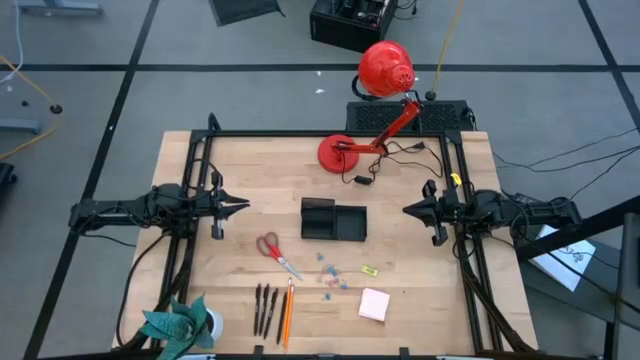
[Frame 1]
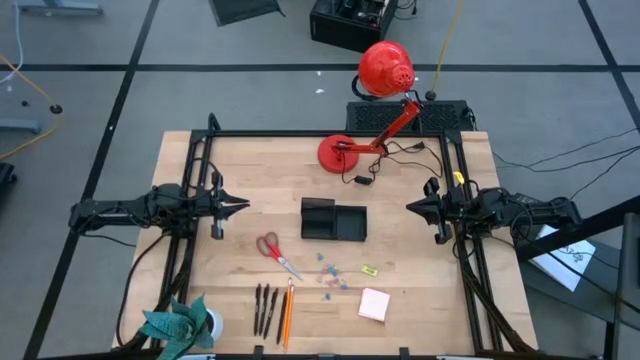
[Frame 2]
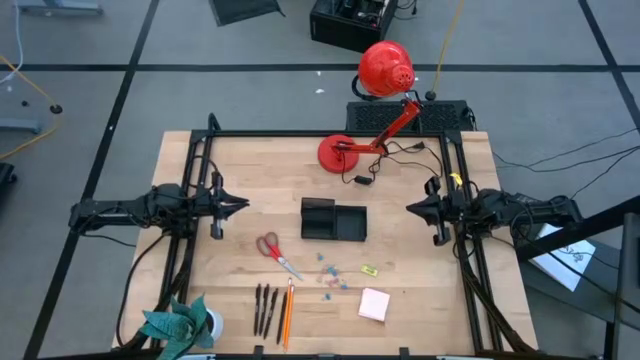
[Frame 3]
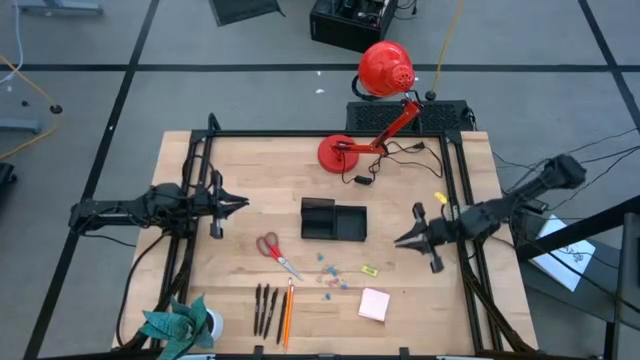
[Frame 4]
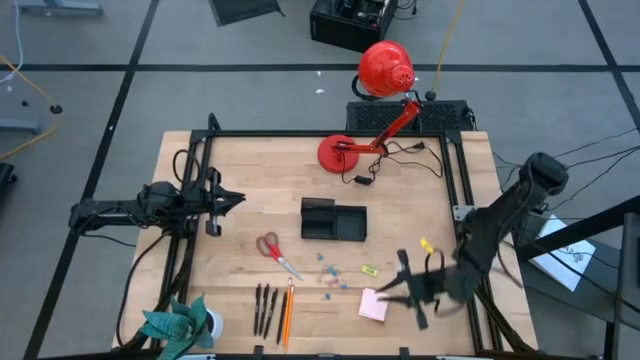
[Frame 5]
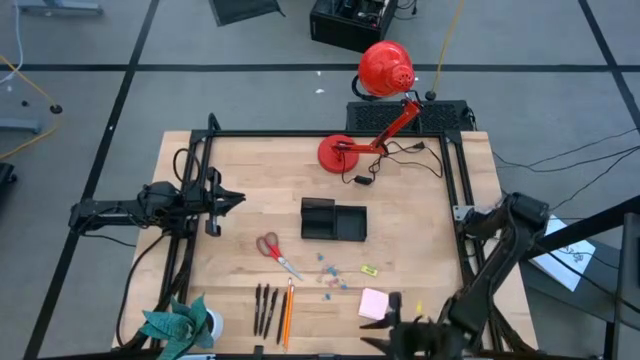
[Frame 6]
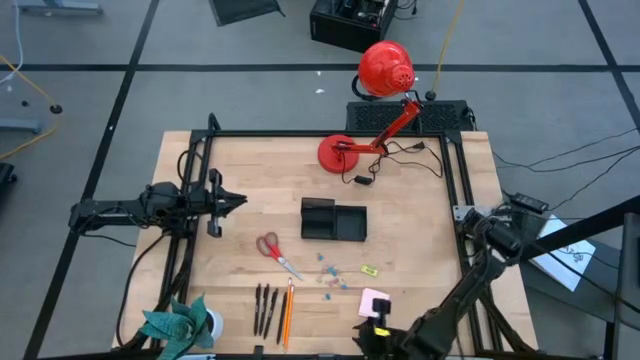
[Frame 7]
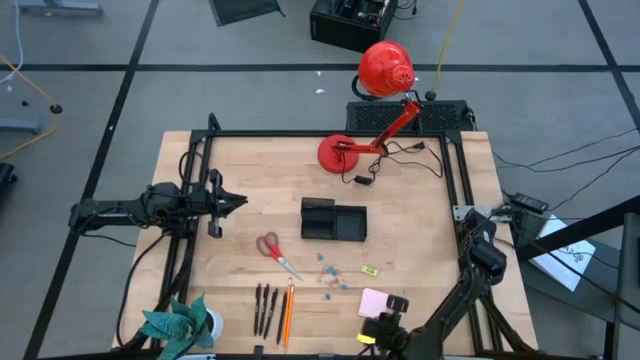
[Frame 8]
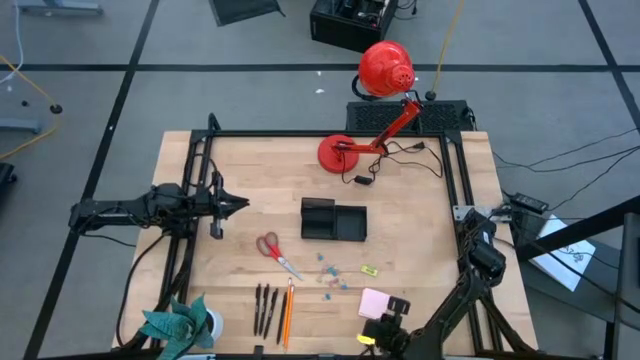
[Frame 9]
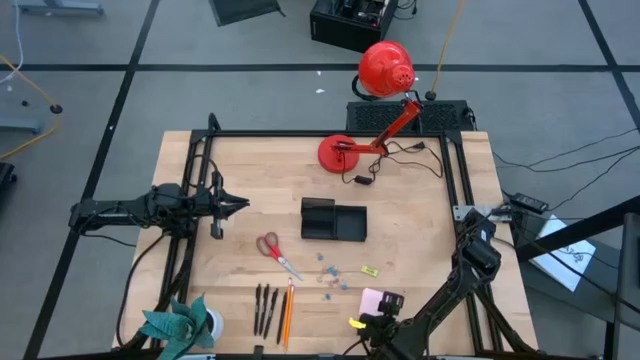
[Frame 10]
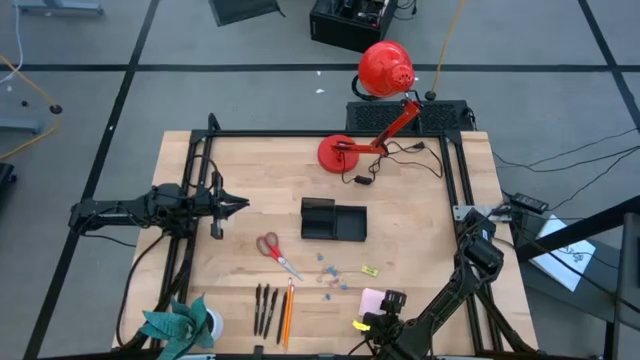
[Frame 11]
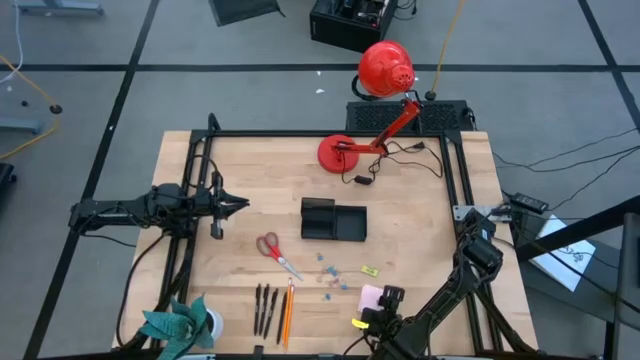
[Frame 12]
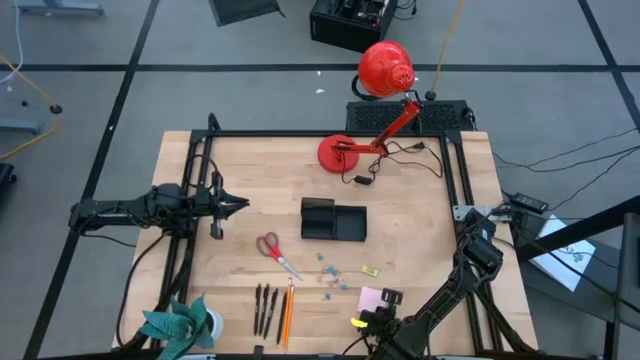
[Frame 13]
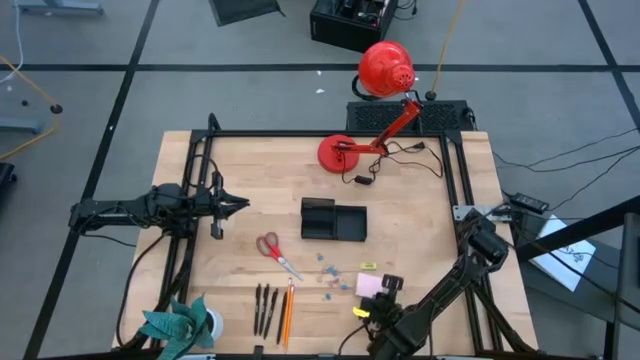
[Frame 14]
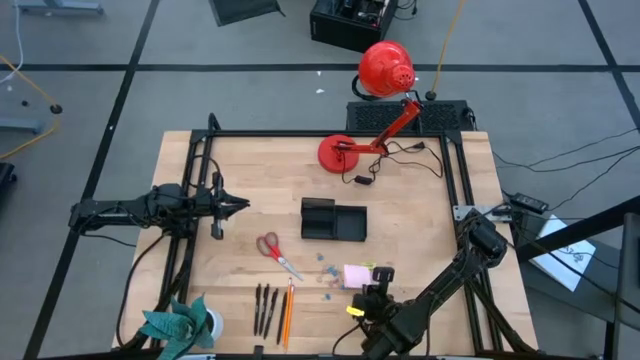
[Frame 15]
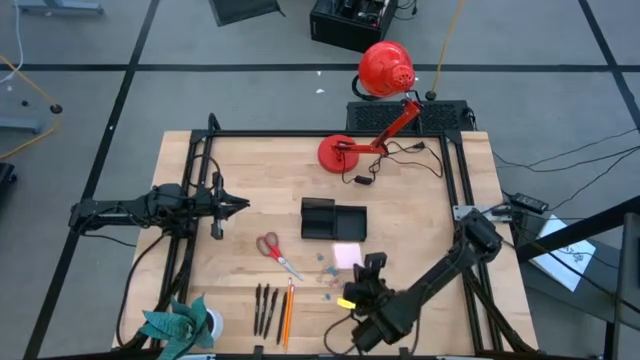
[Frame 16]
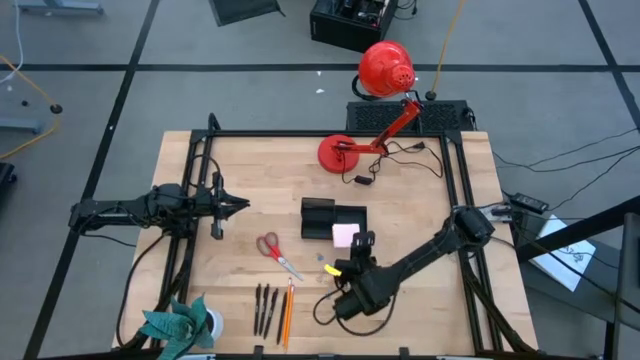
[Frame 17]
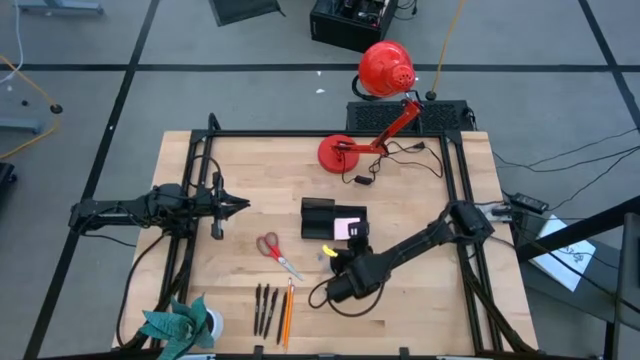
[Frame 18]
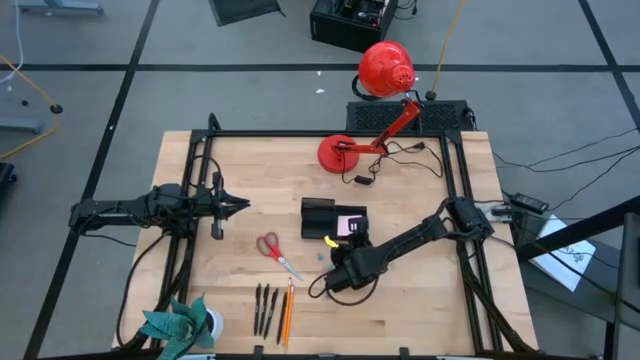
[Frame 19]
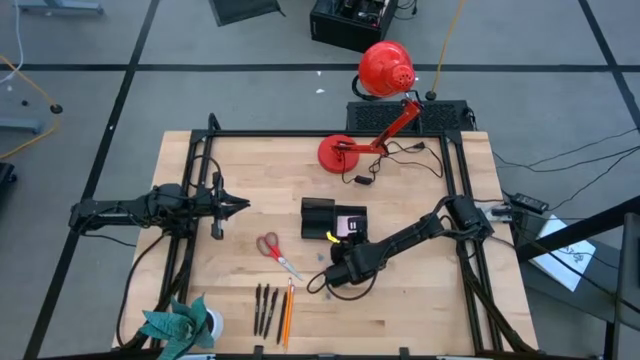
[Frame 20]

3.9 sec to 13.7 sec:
Task: Pick and place office supplies into organizer
Put the pink sticky notes into the mesh desk organizer

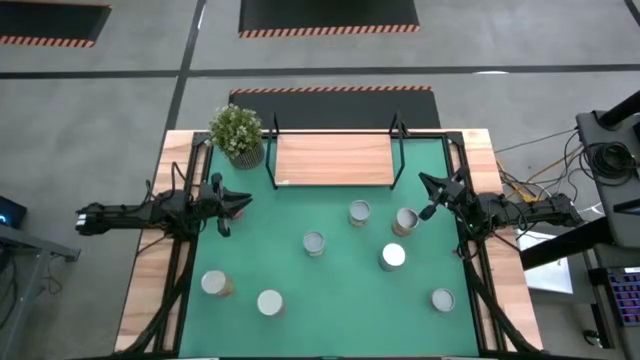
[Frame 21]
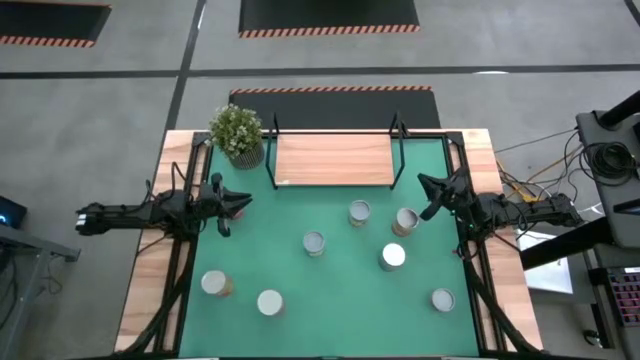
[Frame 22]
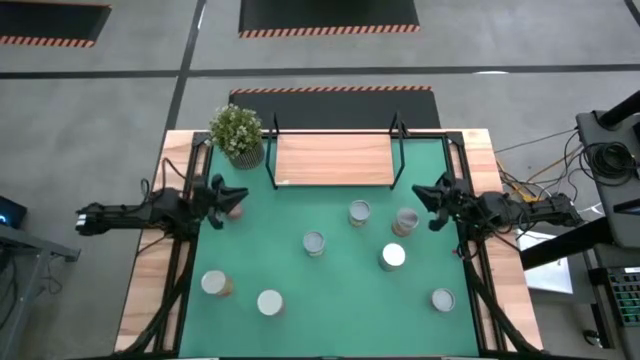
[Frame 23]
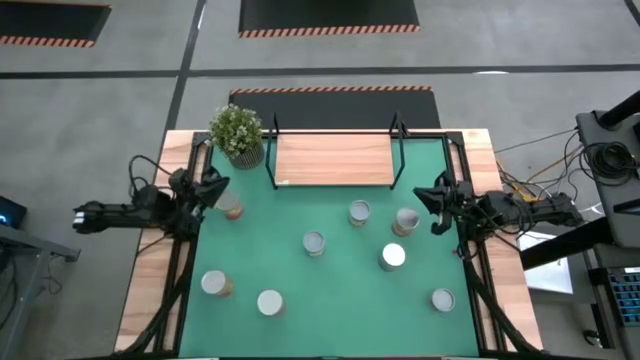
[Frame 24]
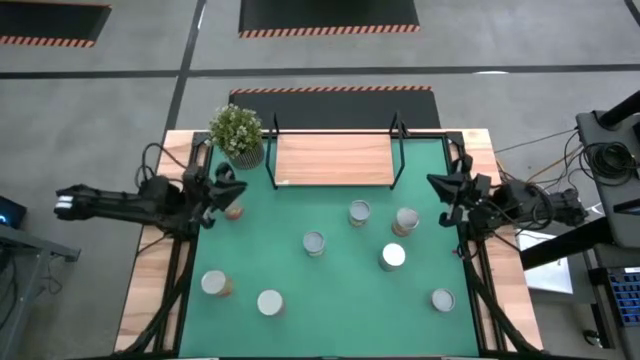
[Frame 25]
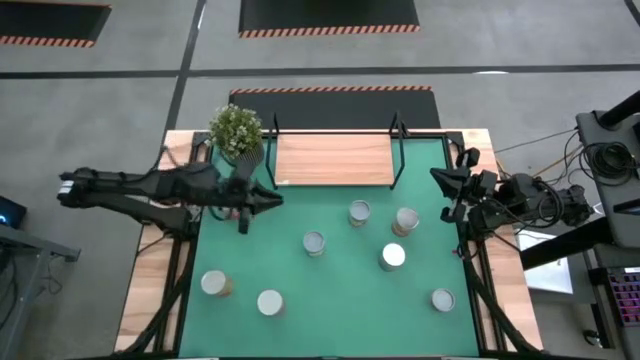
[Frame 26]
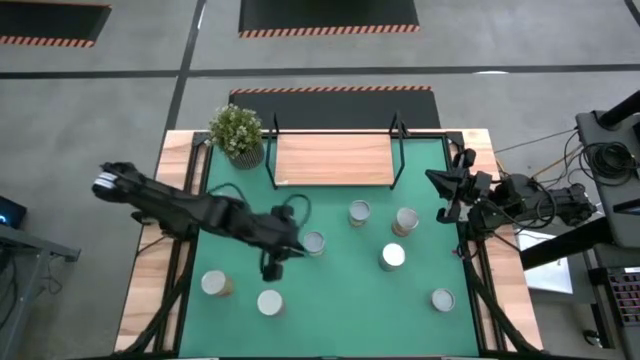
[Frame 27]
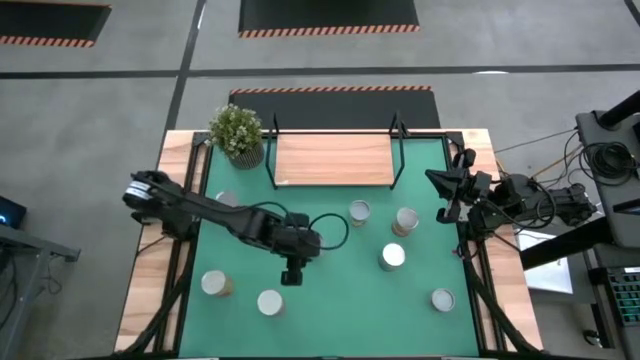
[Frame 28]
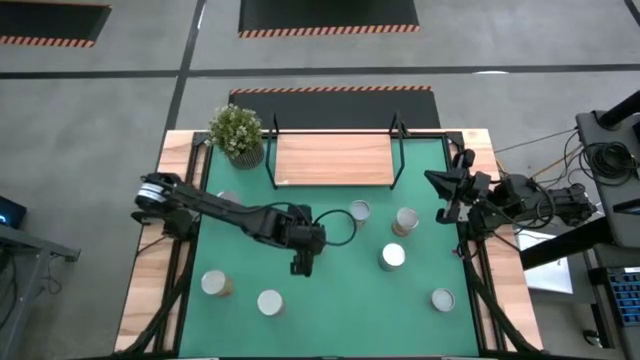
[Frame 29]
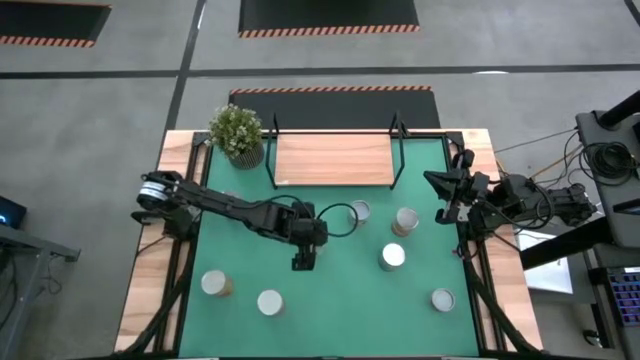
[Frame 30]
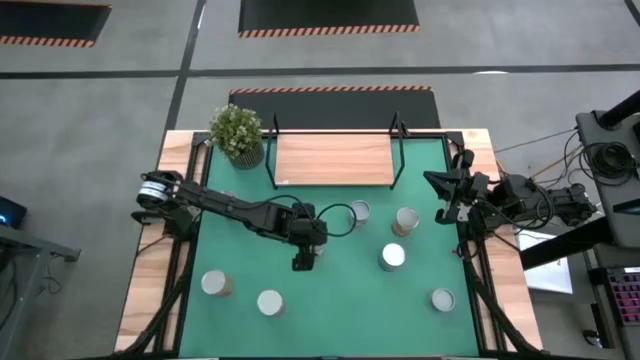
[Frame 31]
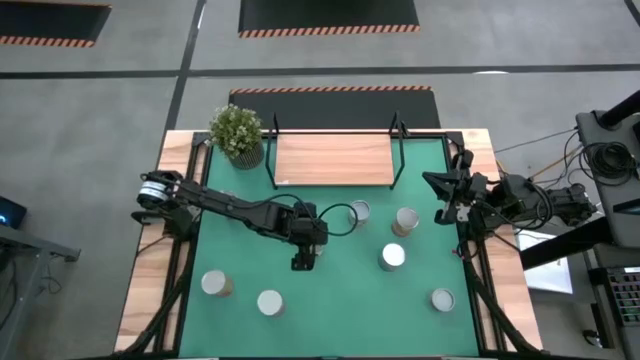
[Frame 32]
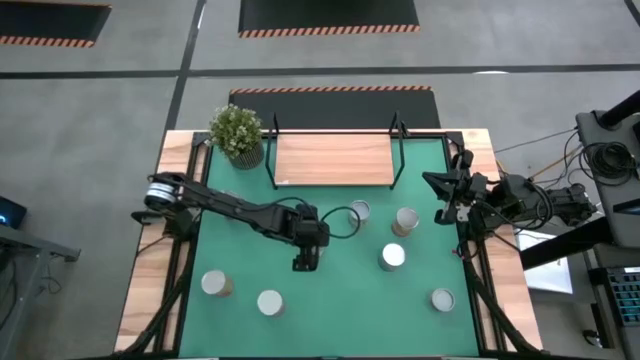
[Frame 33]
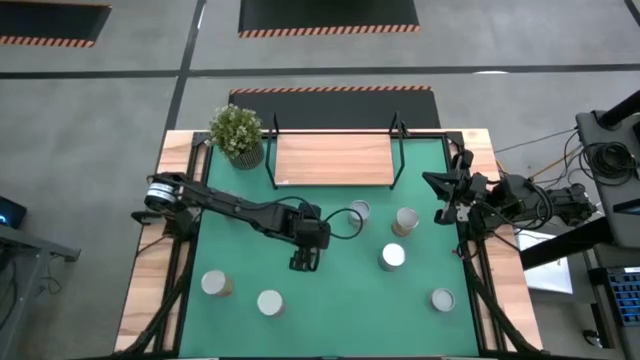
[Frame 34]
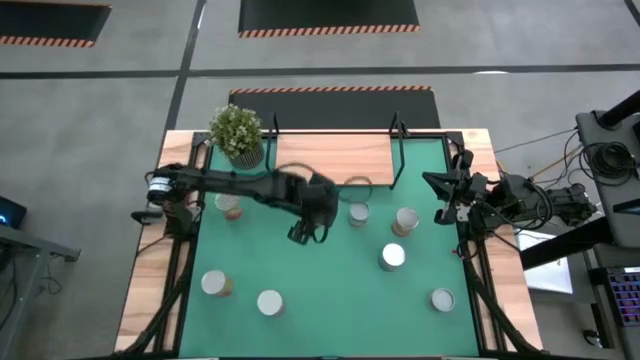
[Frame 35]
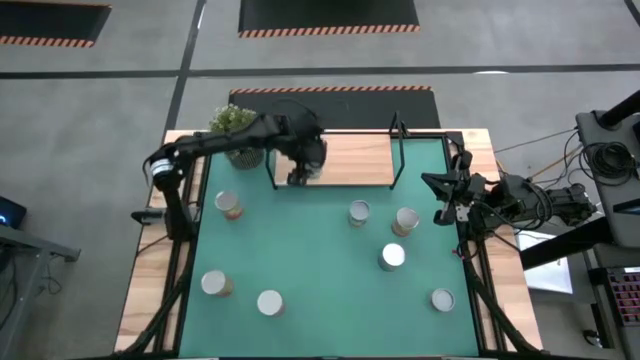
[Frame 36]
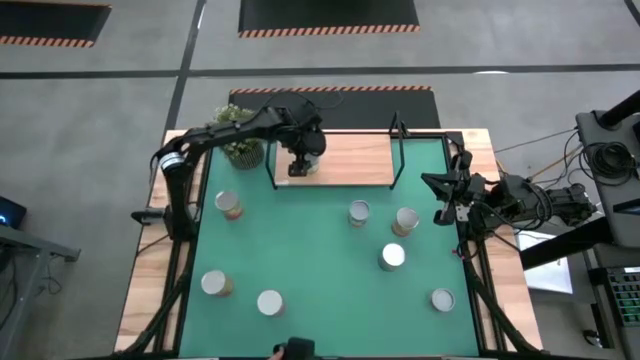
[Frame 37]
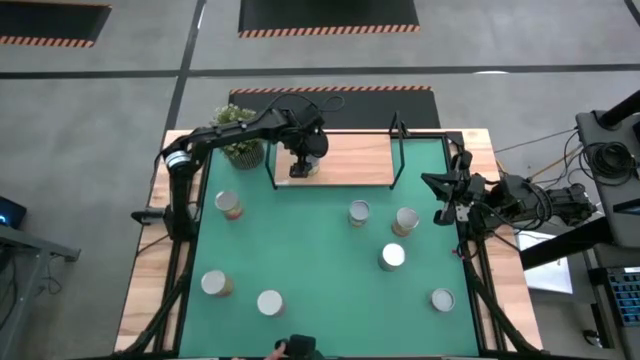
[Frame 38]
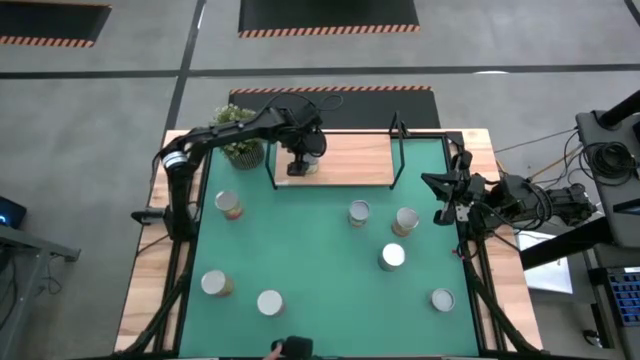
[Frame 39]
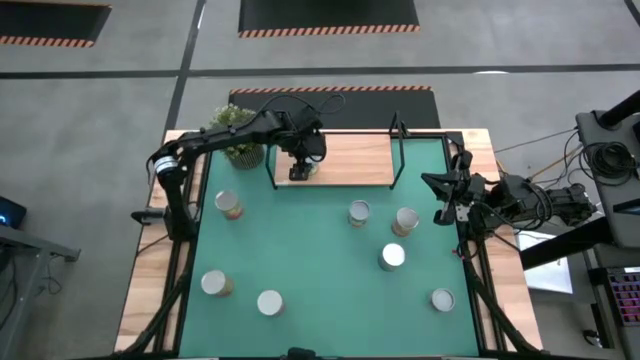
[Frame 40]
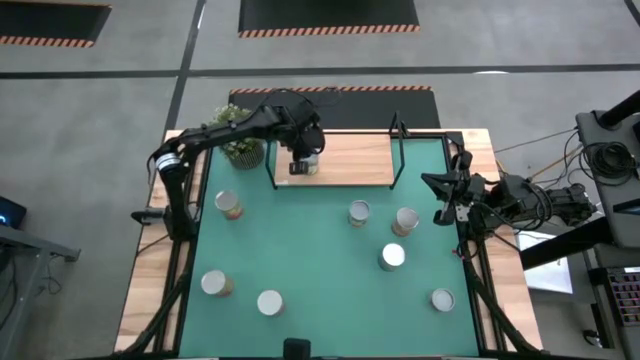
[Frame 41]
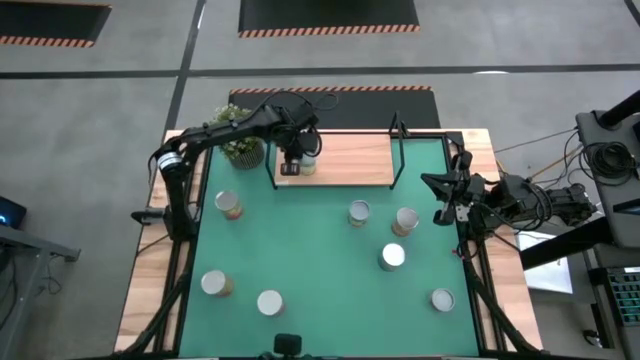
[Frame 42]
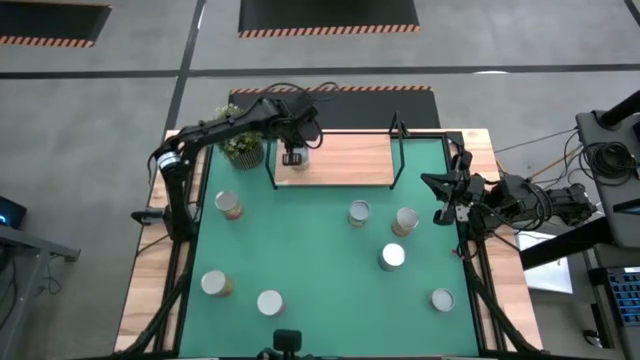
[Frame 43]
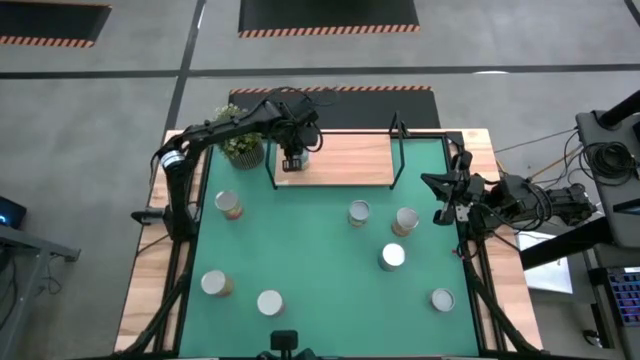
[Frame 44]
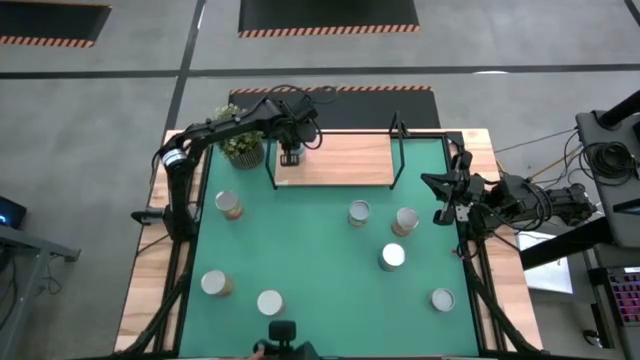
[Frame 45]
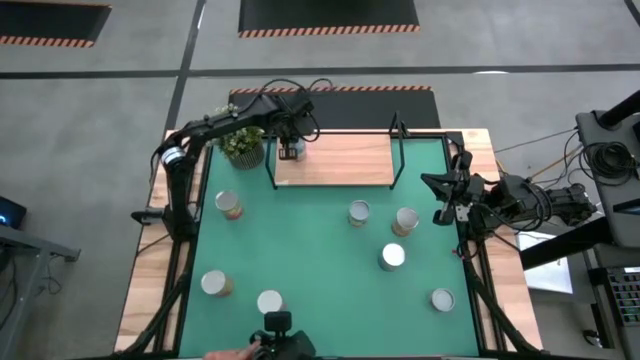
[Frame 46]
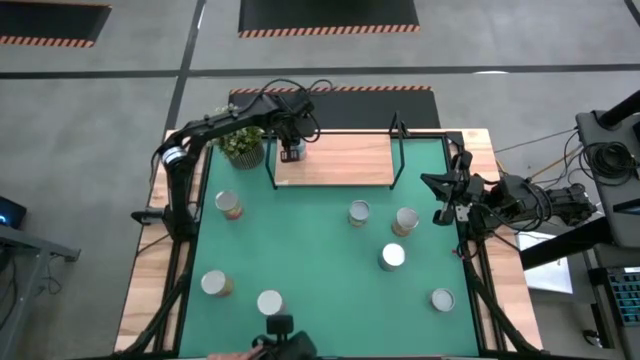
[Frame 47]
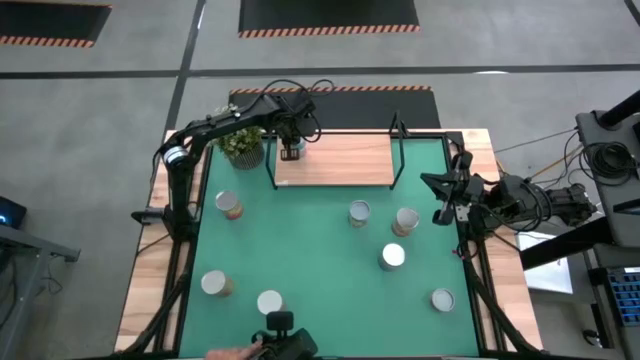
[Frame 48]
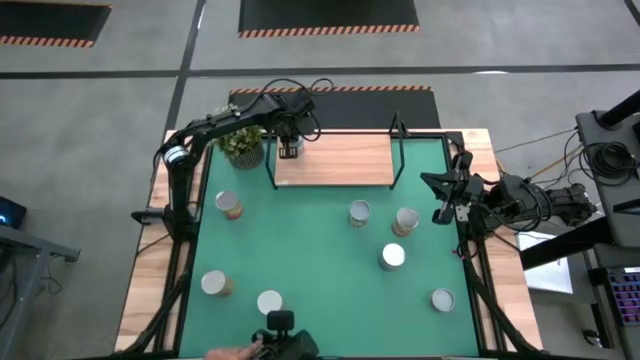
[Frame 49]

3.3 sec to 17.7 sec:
Task: Pick and place cans onto a shelf
Put the canned chicken soup on the shelf
